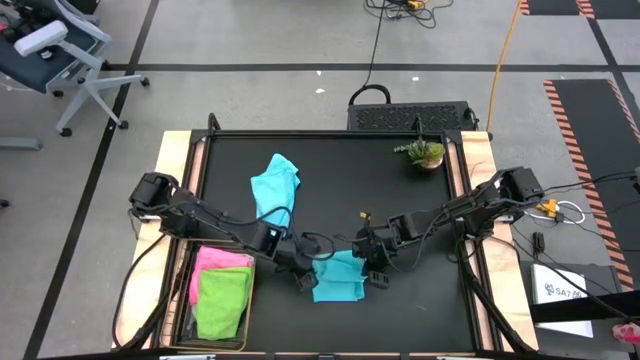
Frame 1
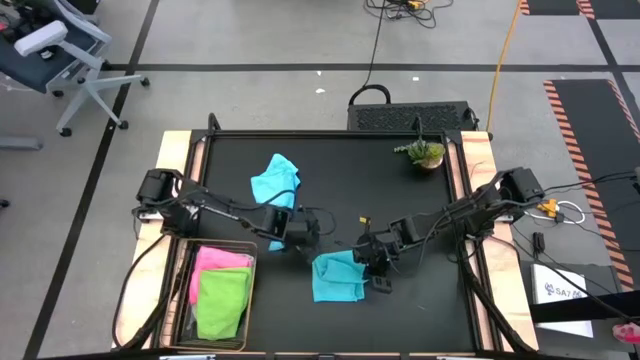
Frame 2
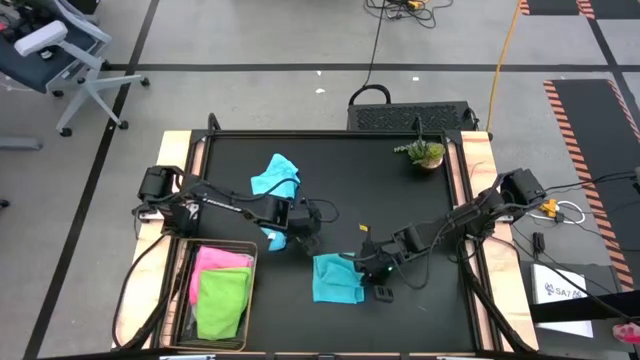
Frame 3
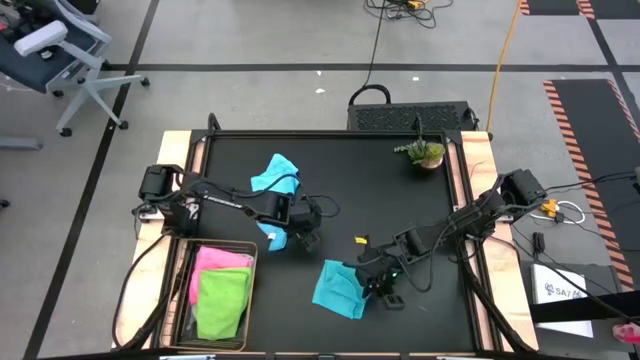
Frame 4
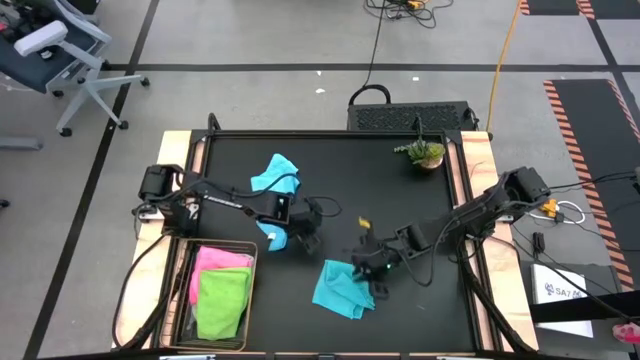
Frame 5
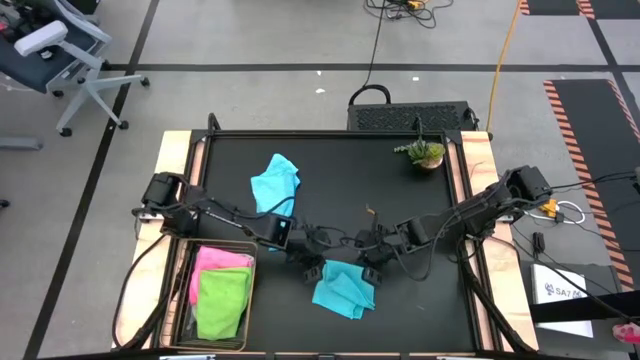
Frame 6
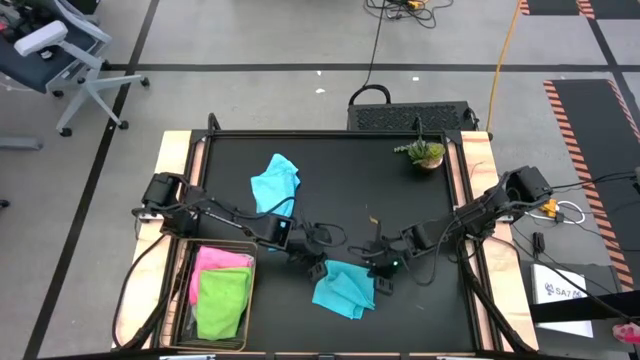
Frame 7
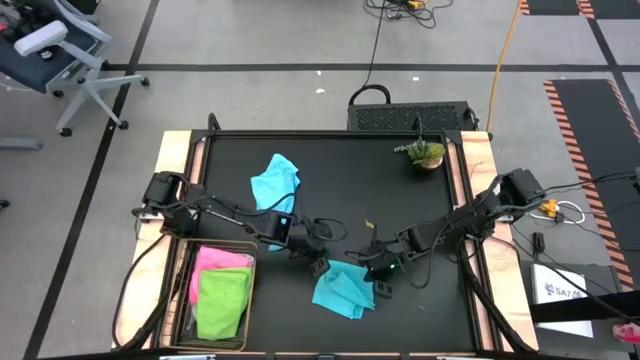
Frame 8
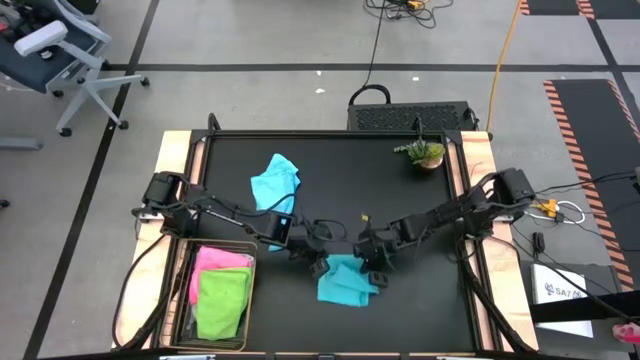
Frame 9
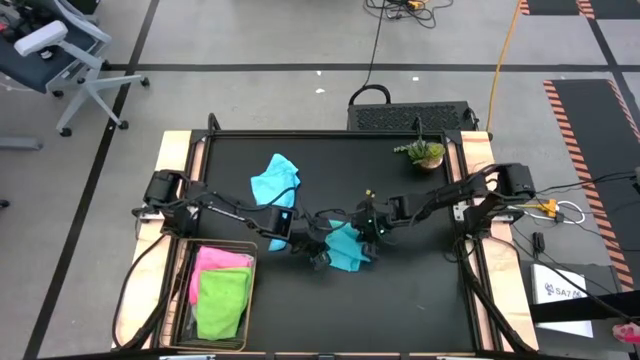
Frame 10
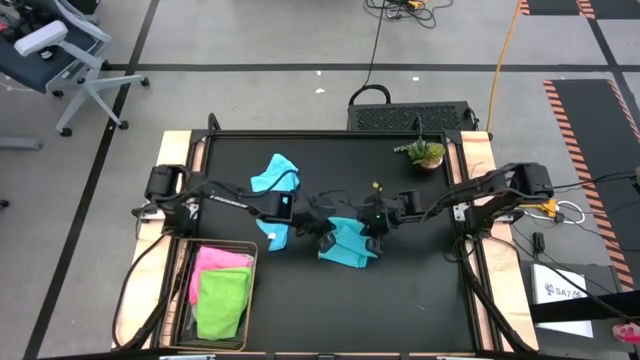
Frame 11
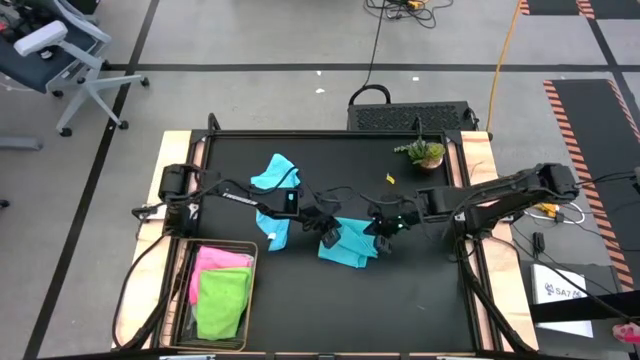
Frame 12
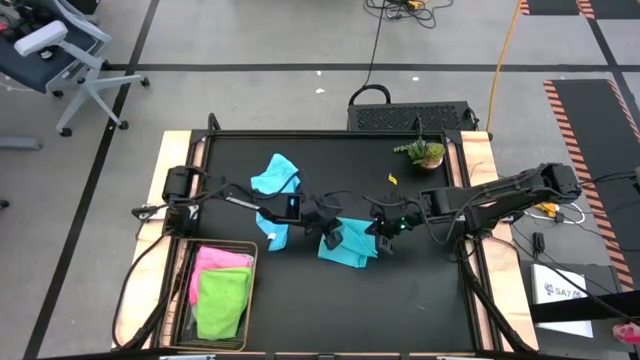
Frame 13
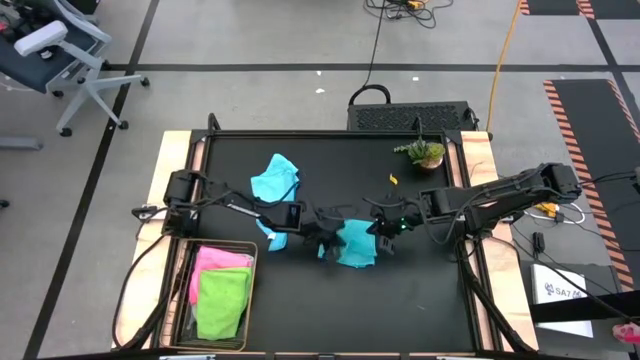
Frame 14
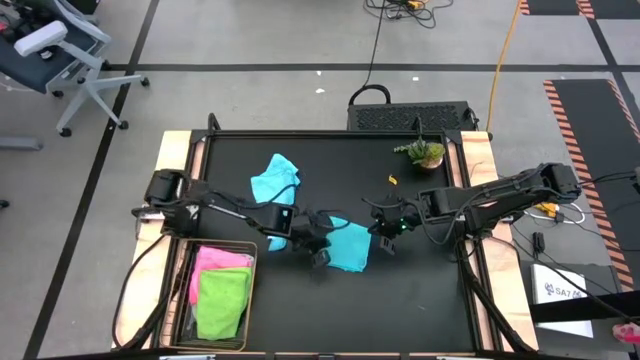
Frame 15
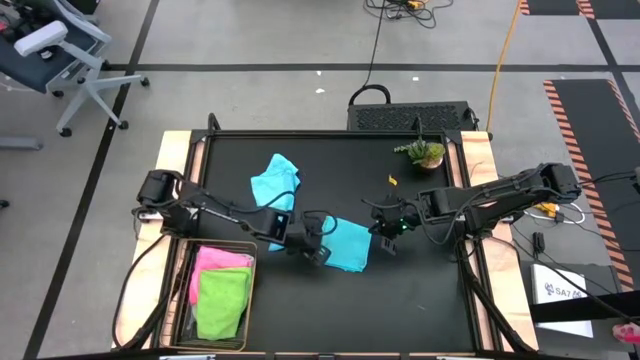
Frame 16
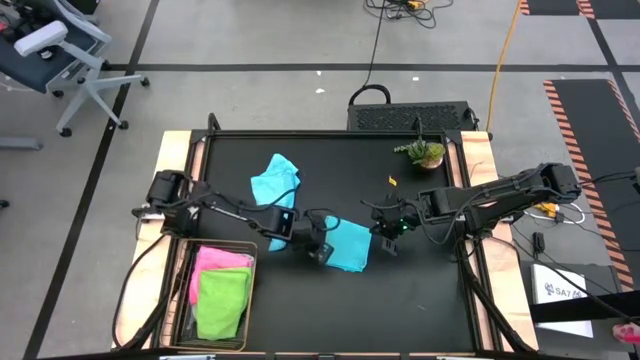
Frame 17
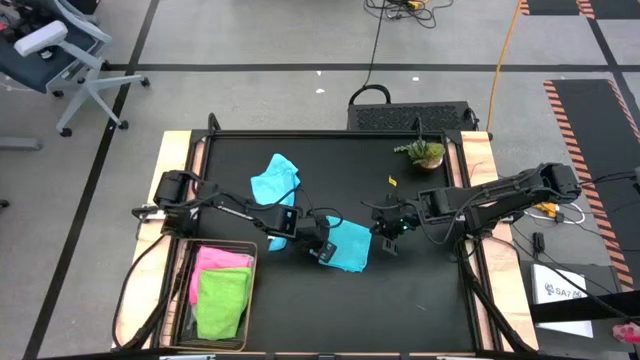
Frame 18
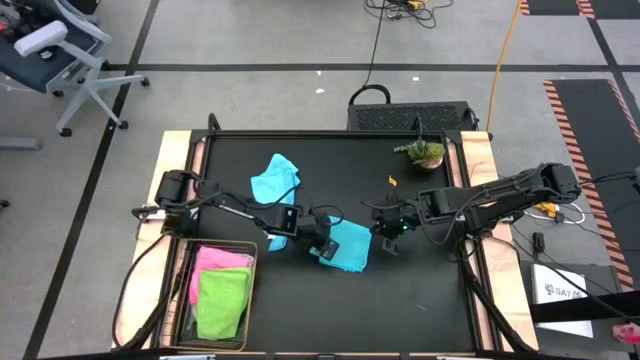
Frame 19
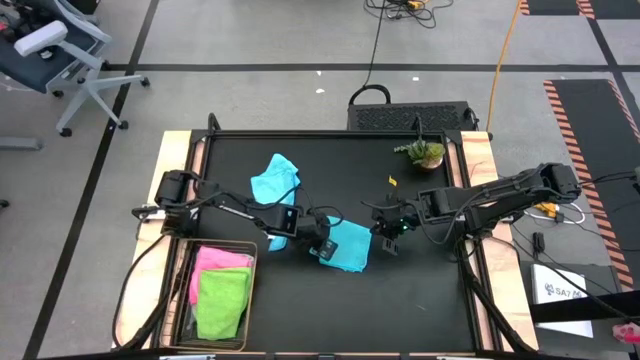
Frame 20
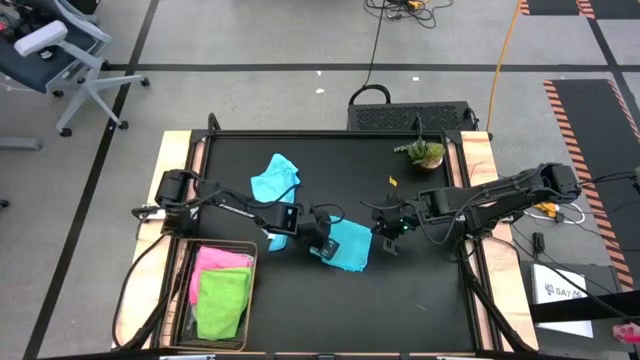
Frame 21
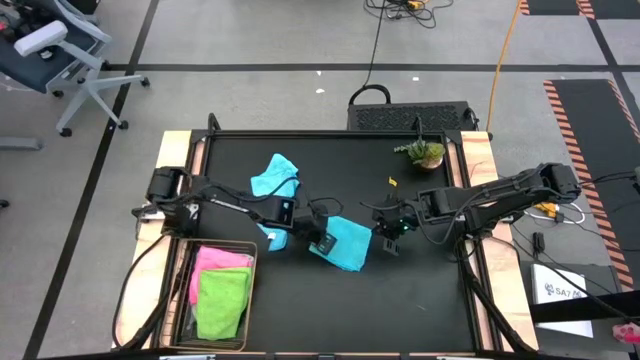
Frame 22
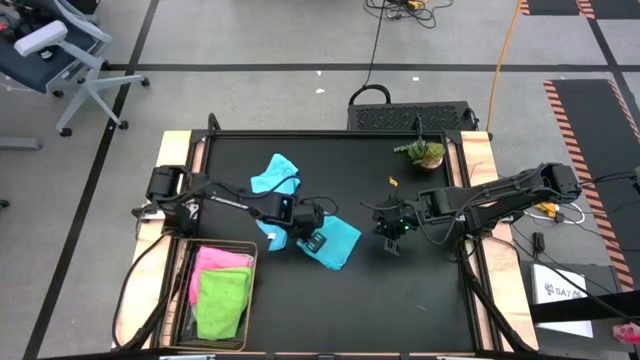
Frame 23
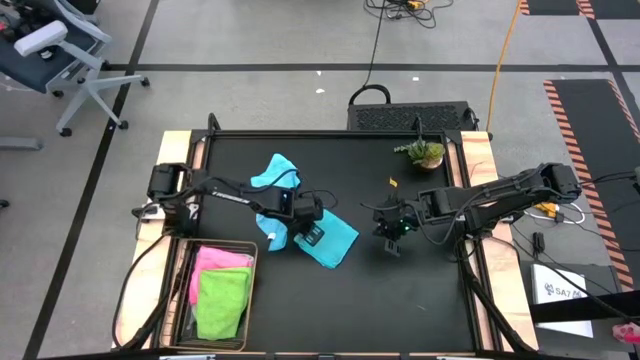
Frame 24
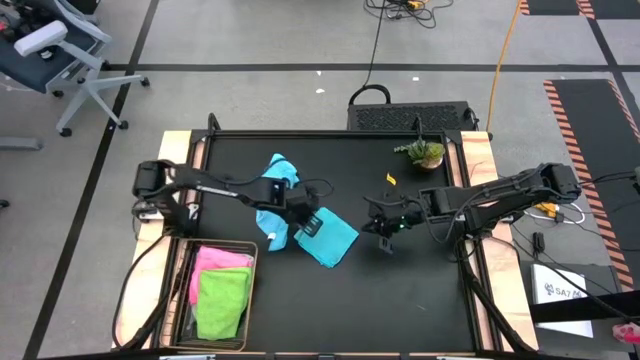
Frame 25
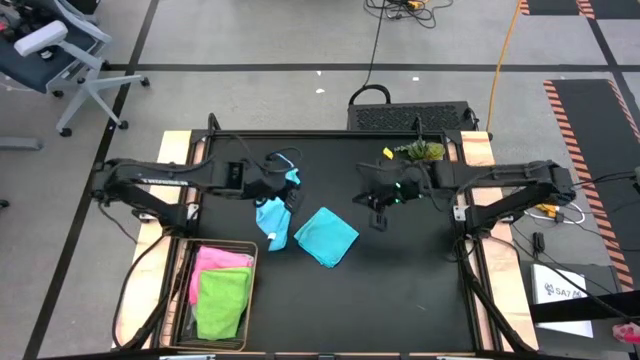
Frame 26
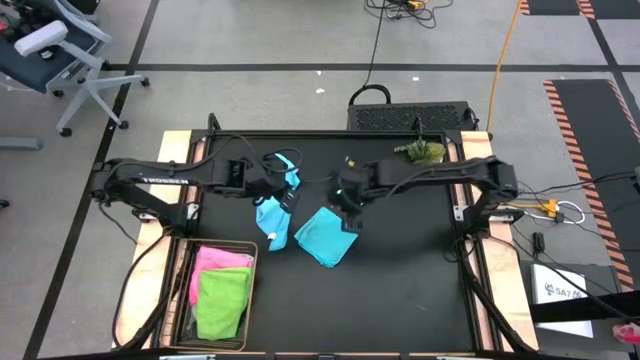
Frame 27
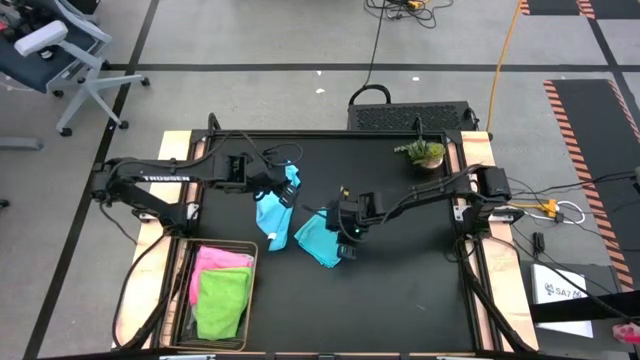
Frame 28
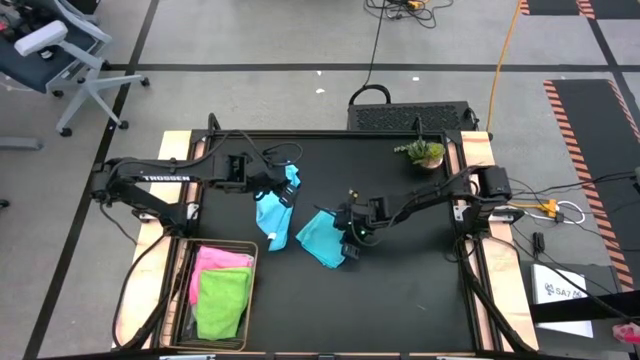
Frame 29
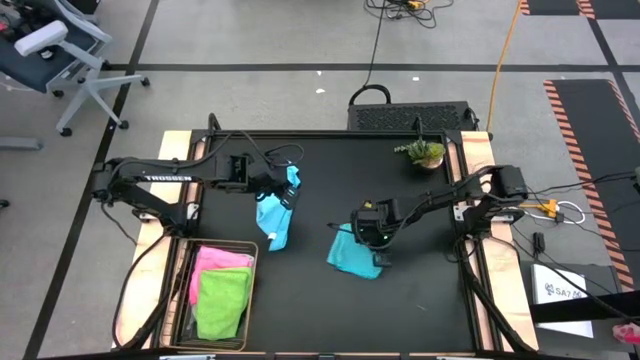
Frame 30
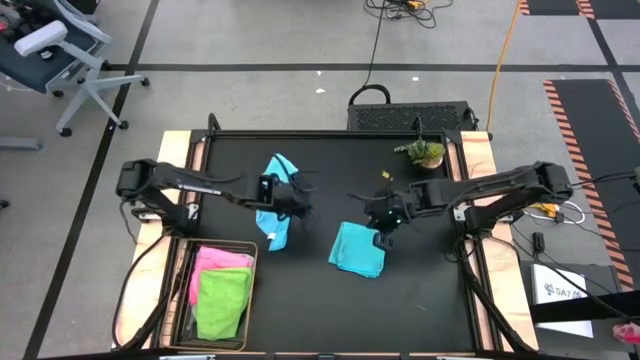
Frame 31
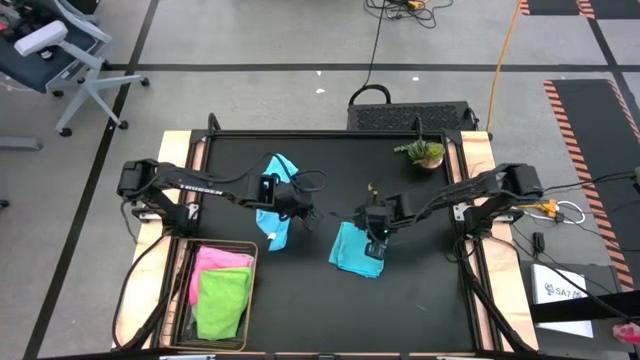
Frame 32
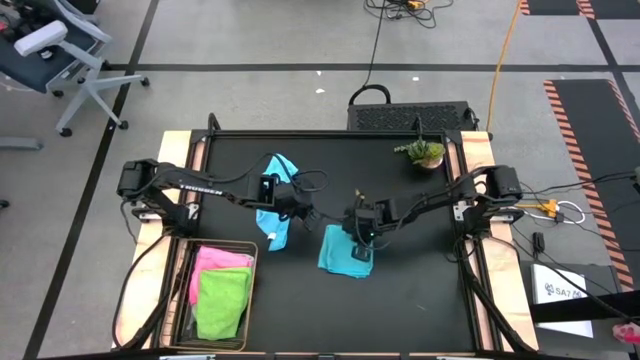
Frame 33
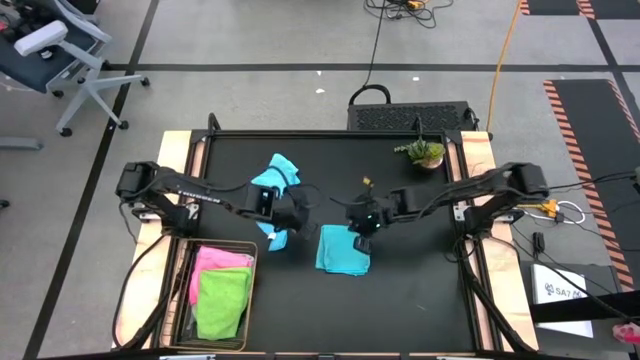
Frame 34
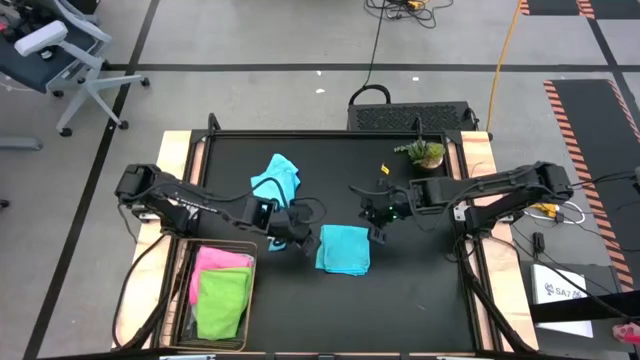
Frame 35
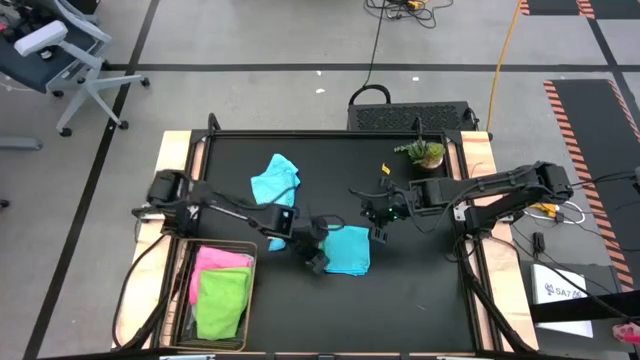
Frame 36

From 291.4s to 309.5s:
Task: Fold microfiber towels
Fold the right blue microfiber cloth

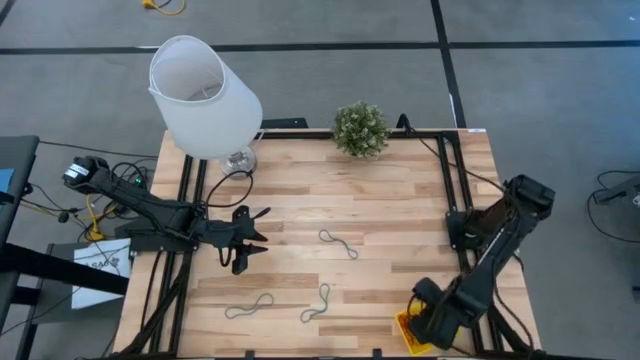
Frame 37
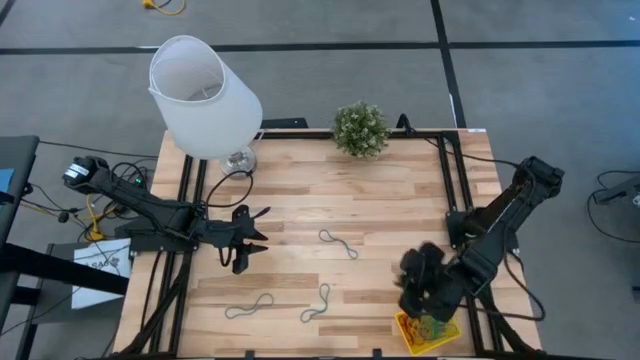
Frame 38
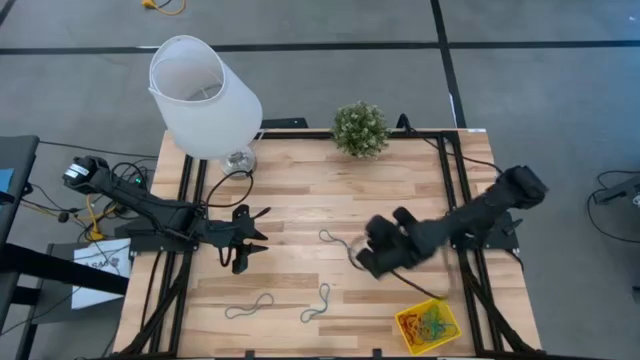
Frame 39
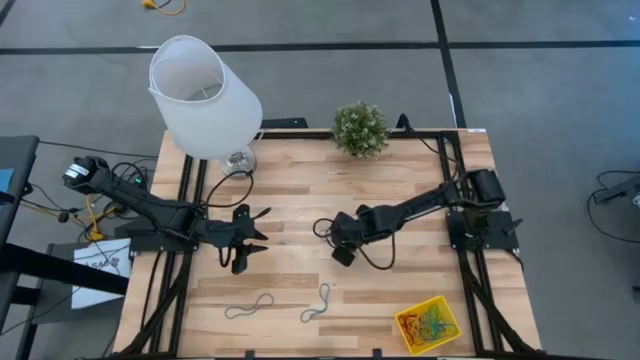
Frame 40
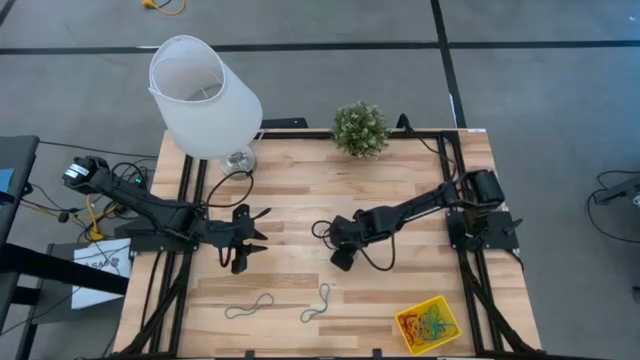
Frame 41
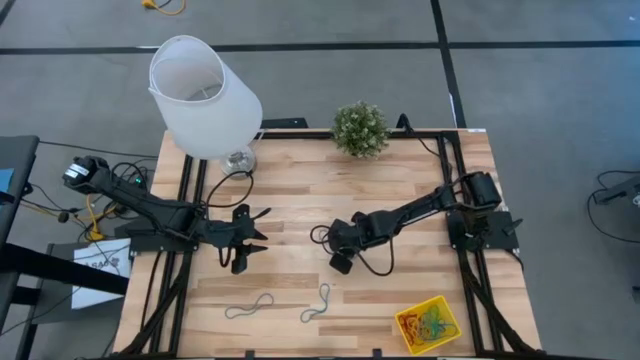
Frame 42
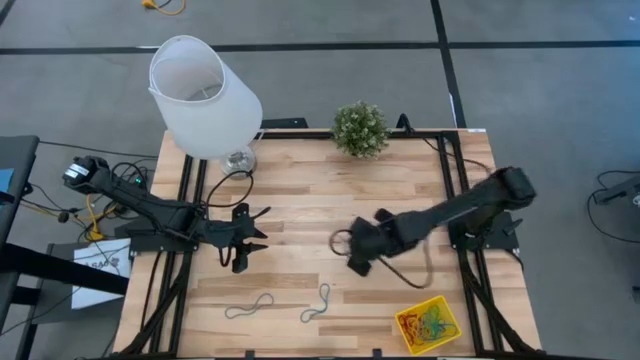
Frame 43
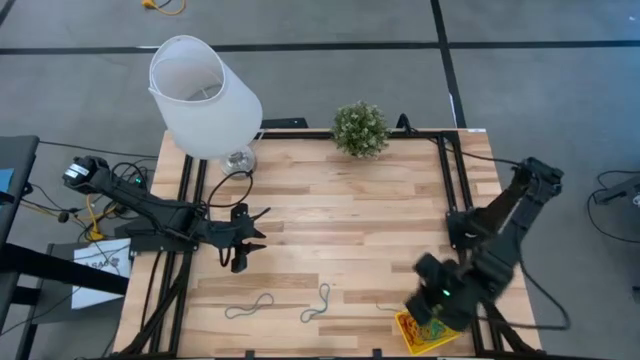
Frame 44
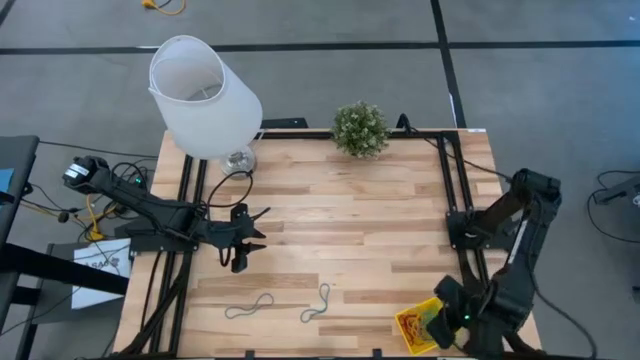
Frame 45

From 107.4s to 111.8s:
Task: Pick and place rubber bands into bin
Put the blue rubber band into the yellow basket
